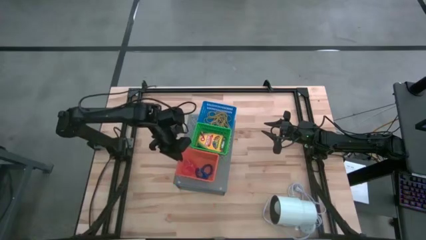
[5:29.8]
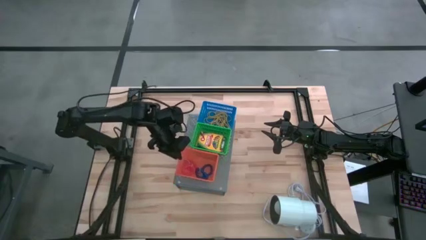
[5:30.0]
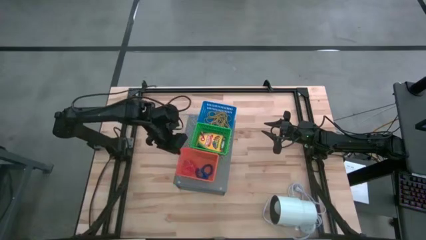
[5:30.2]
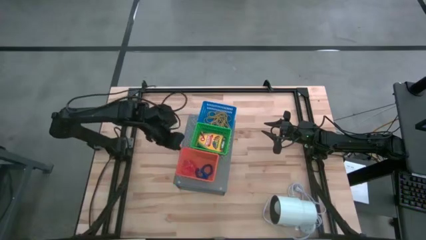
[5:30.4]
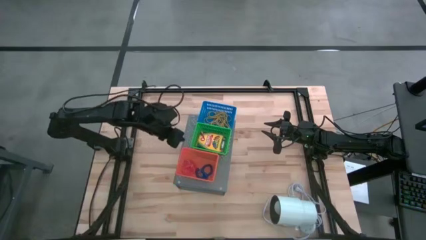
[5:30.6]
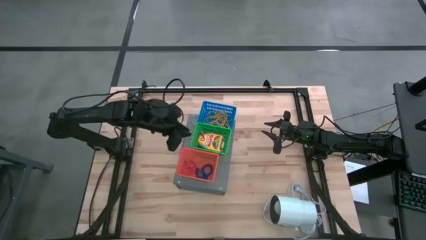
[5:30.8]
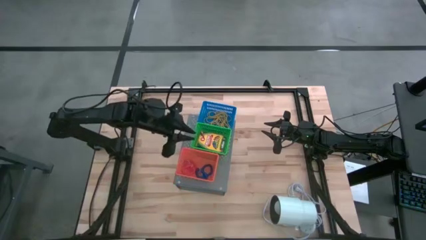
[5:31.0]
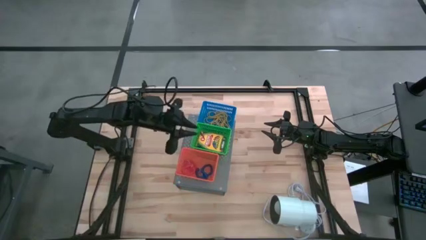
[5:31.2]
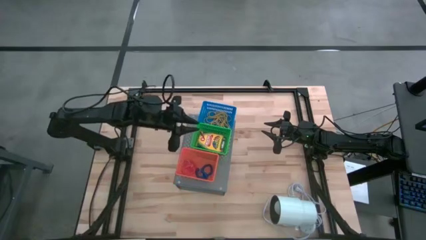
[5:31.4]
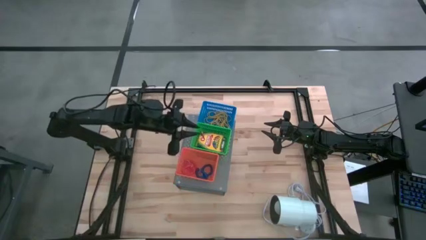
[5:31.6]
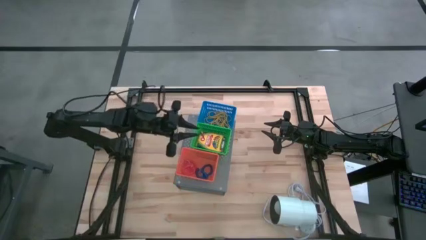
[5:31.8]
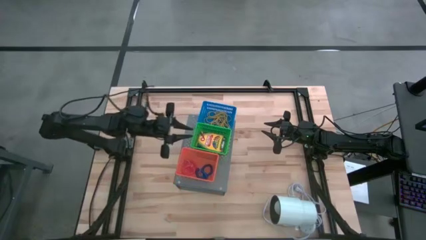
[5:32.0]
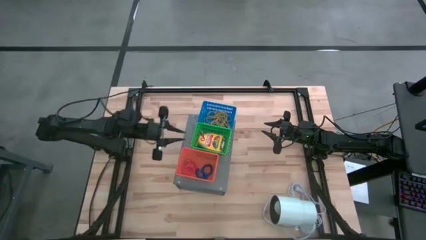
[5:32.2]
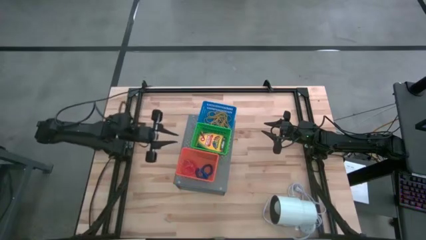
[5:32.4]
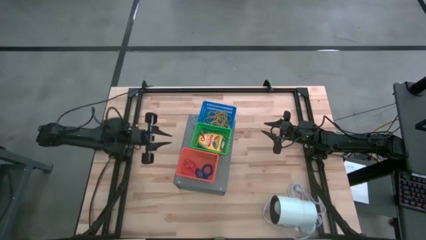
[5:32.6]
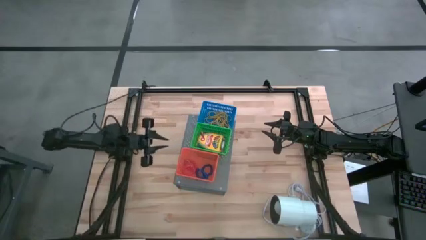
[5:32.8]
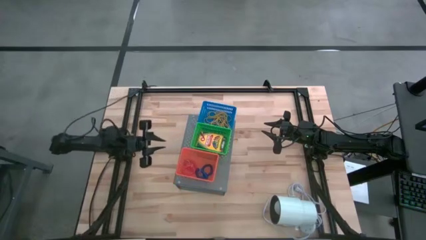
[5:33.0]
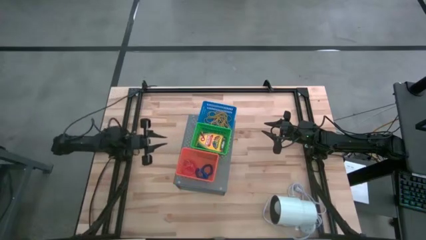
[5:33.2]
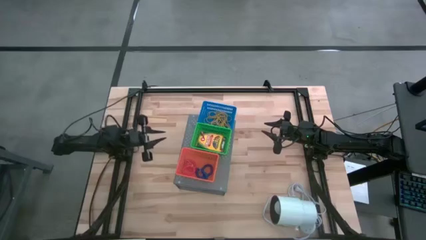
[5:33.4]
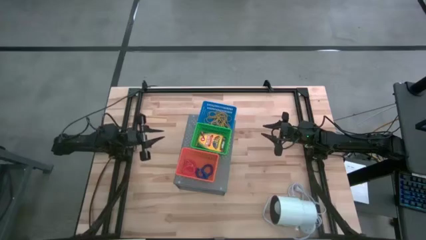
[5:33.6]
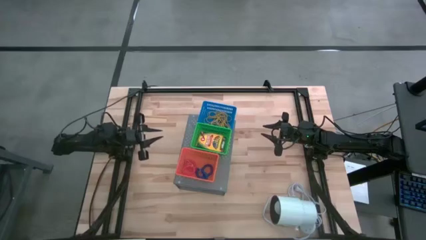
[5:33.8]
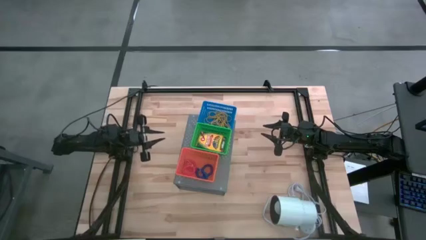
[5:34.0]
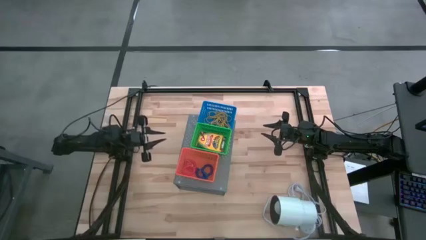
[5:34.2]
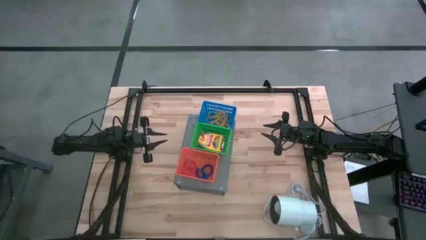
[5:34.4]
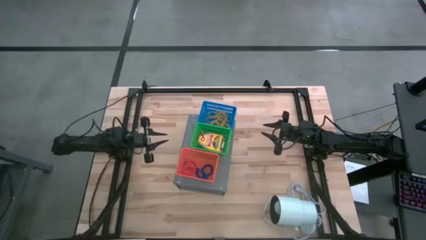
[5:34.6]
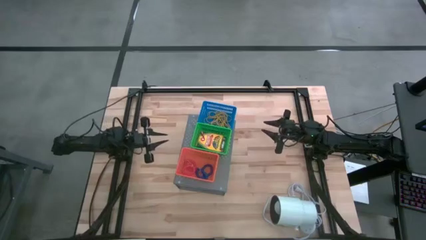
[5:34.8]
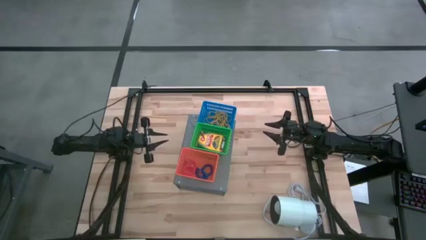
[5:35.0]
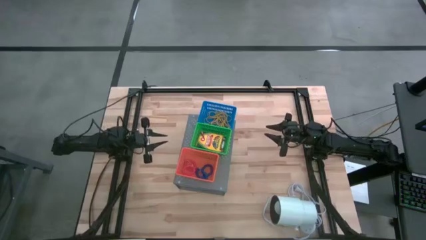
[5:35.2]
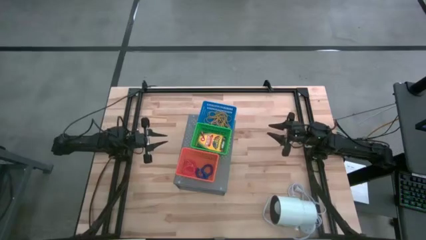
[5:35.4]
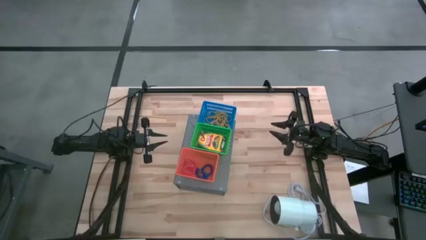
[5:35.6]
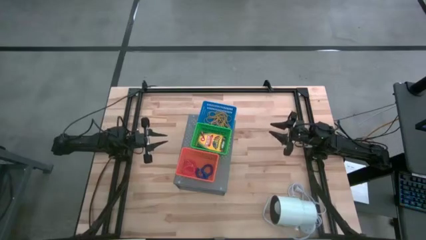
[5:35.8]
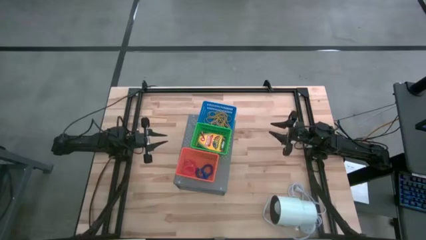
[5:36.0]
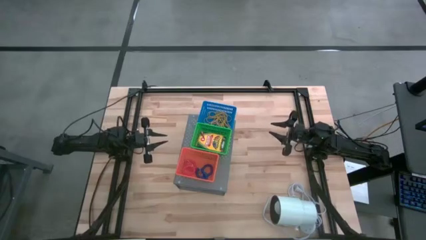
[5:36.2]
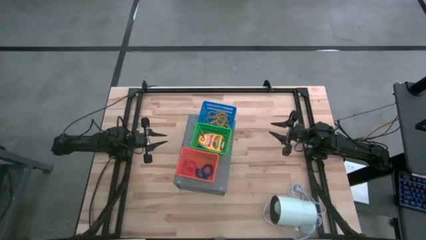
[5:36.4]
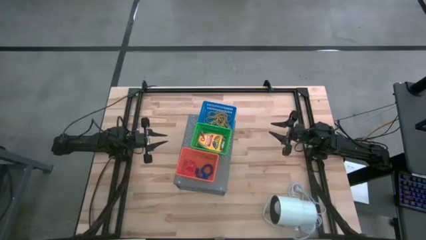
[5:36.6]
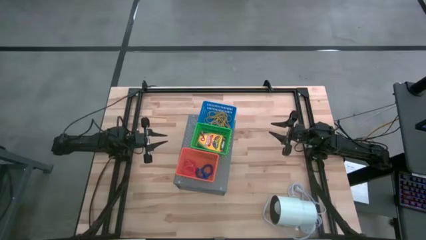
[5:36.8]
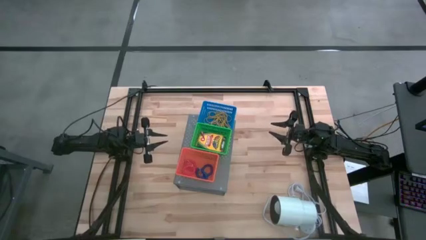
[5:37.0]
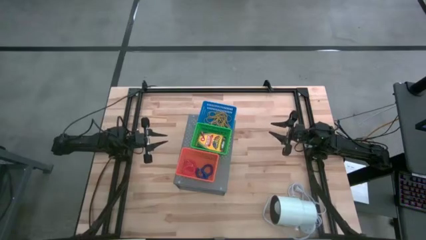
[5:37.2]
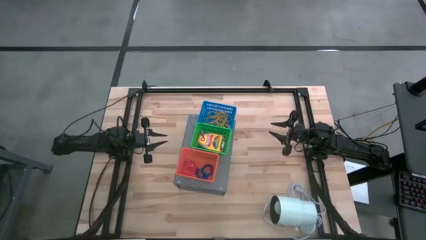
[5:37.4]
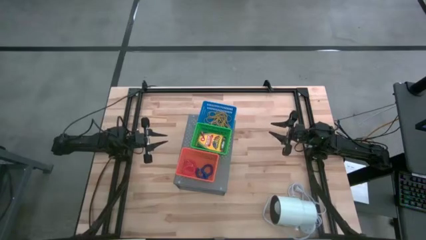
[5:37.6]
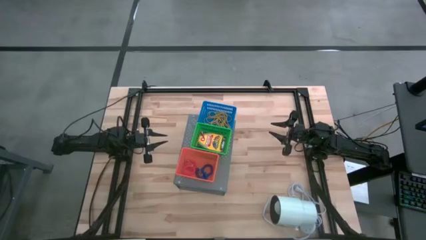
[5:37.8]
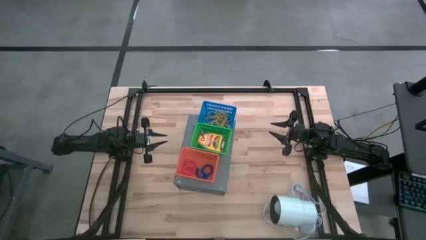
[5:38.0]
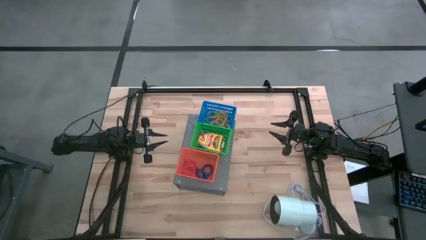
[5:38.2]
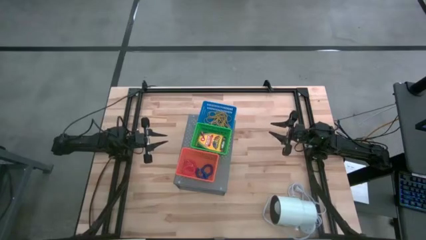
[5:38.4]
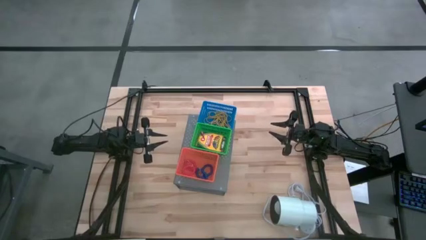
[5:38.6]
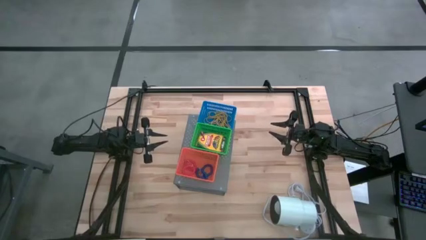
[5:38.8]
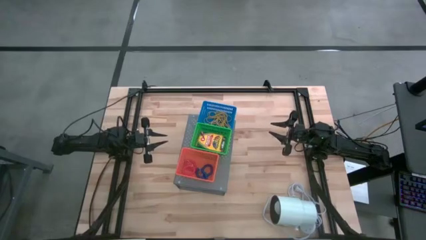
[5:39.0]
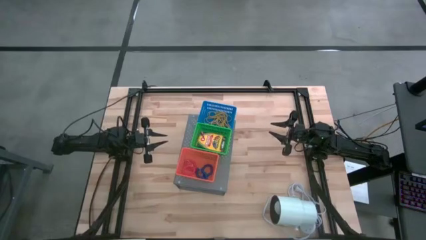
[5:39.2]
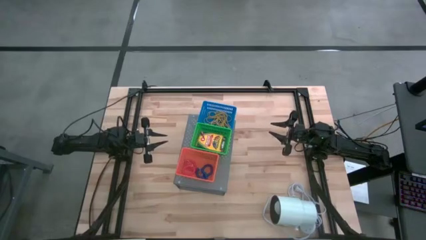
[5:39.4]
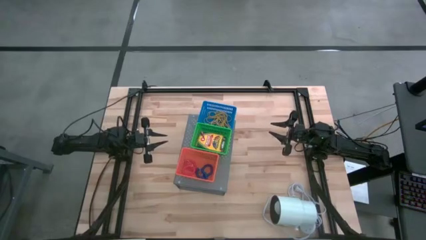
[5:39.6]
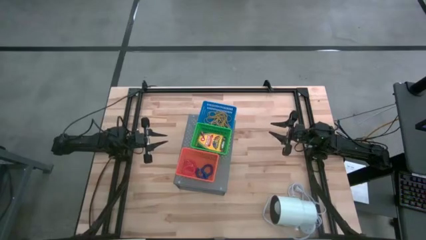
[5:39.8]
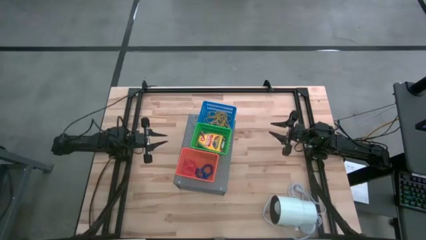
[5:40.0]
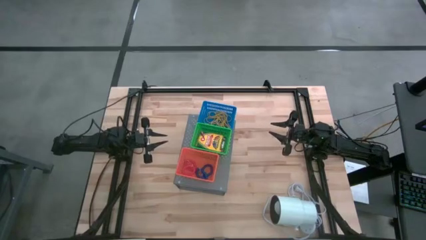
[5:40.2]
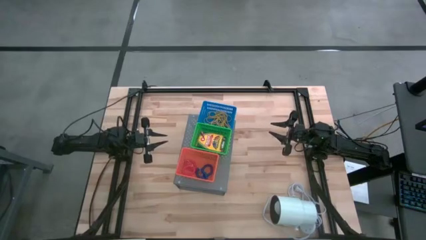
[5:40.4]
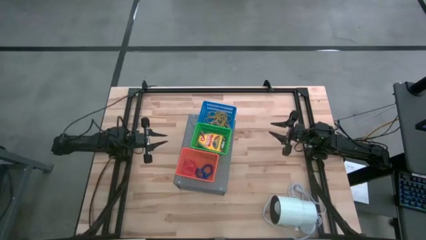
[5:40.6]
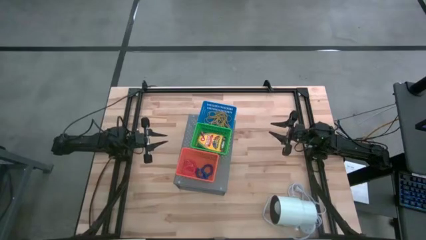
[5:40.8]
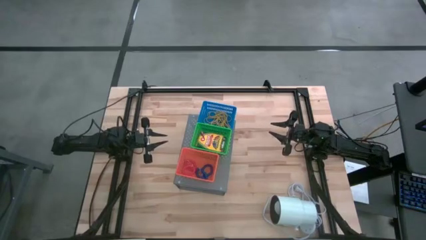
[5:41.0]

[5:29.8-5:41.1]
Task: Pick & Place Office Desk Supplies
Return to Home Position

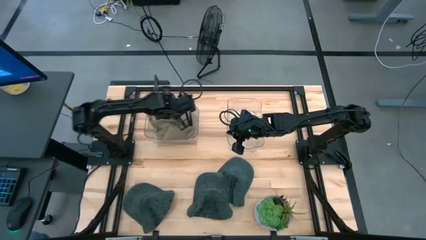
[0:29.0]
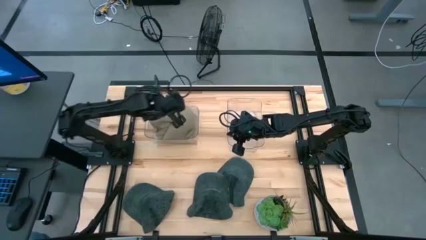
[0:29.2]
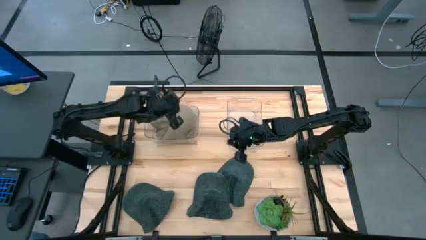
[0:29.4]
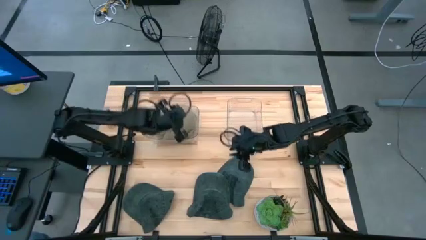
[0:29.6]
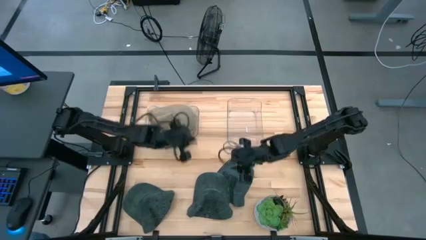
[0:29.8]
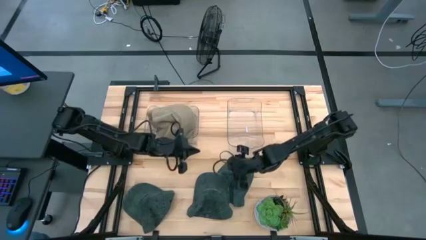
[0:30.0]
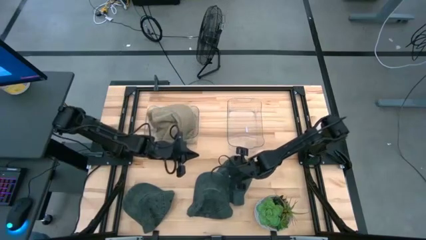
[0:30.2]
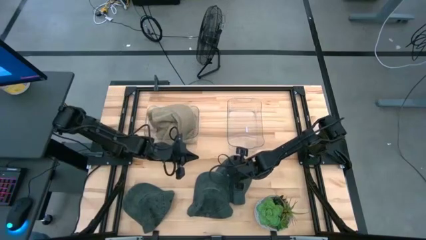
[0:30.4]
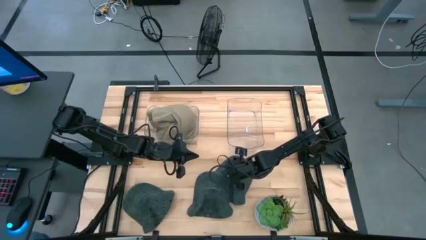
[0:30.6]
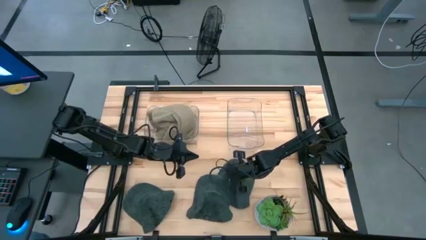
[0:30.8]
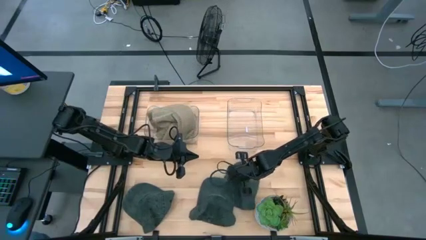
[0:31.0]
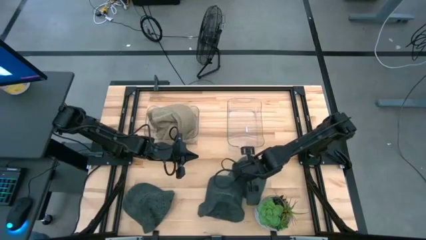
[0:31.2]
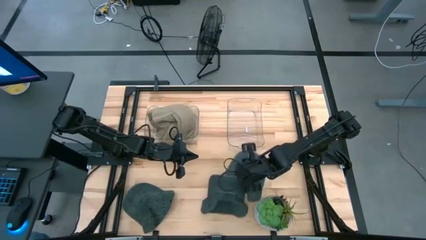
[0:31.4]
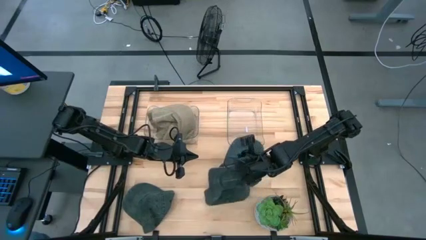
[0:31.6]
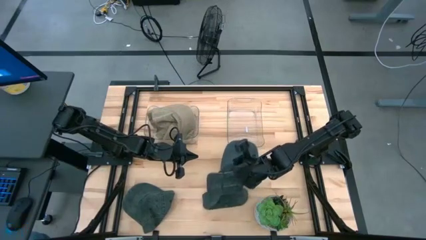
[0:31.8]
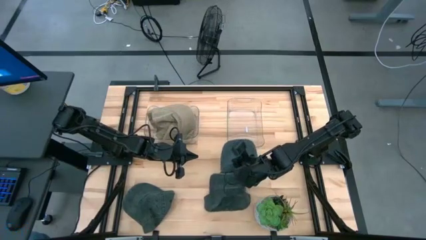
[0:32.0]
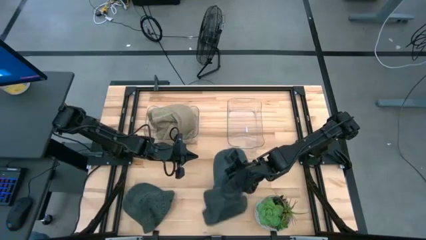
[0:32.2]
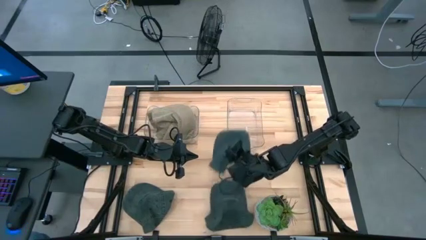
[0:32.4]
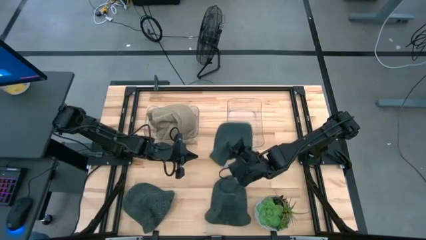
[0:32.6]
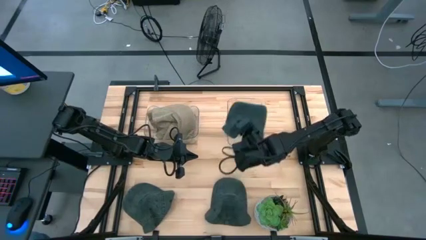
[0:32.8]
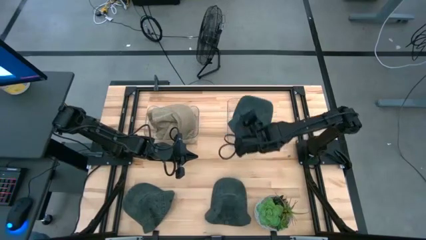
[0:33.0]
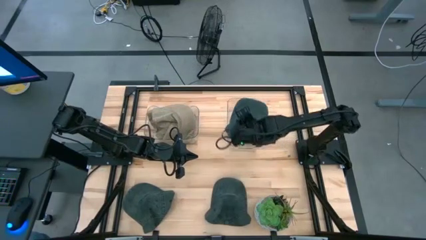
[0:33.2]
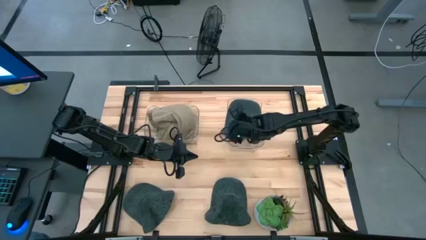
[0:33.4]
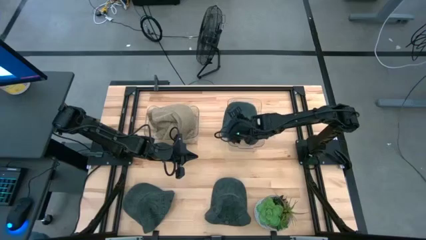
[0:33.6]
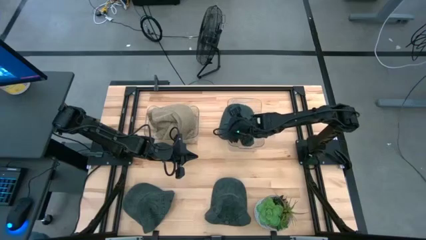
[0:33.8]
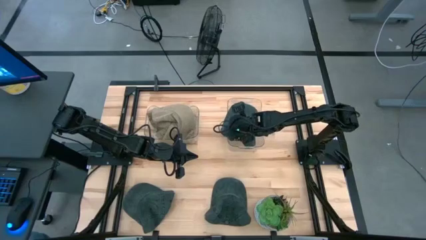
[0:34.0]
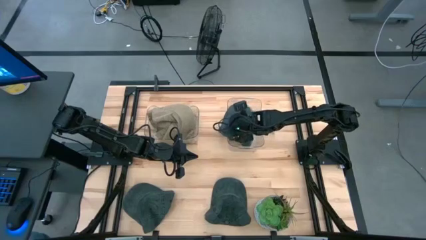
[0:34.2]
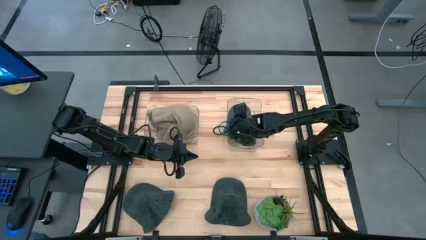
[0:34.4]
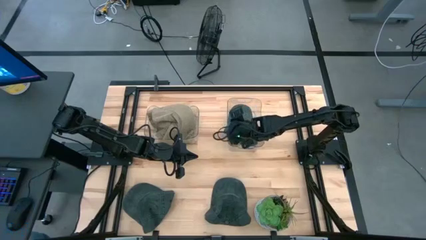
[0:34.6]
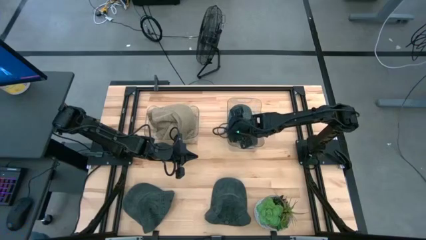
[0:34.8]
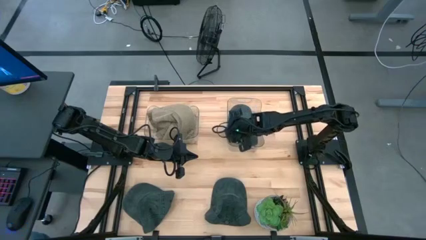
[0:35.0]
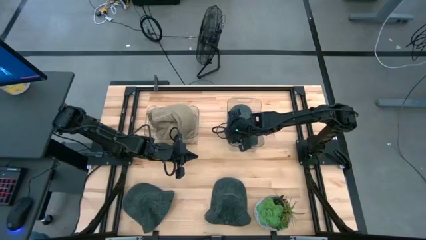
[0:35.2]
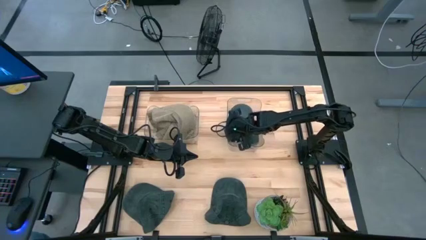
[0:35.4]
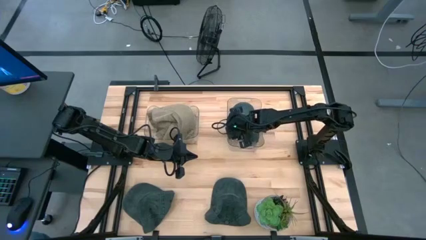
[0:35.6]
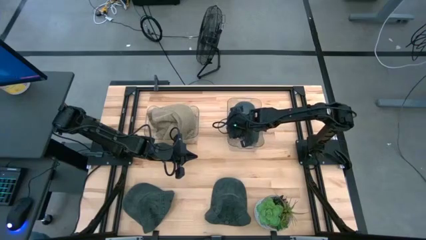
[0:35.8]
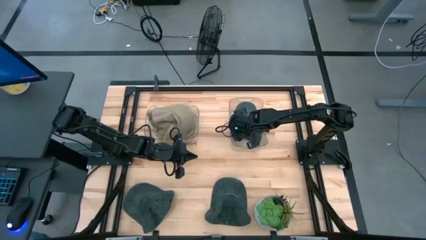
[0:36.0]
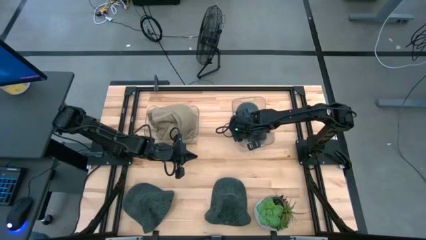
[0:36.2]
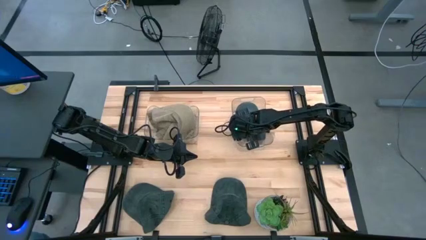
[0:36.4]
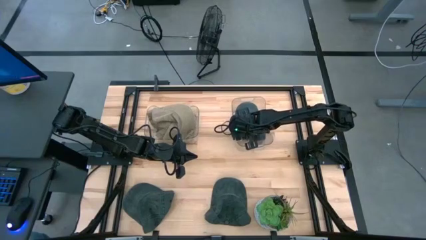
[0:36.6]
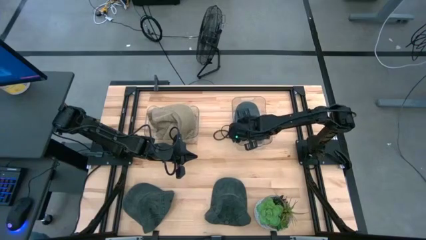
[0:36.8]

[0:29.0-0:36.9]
Task: Pick & Place hat
Put the top right black cap into the right transparent bin
